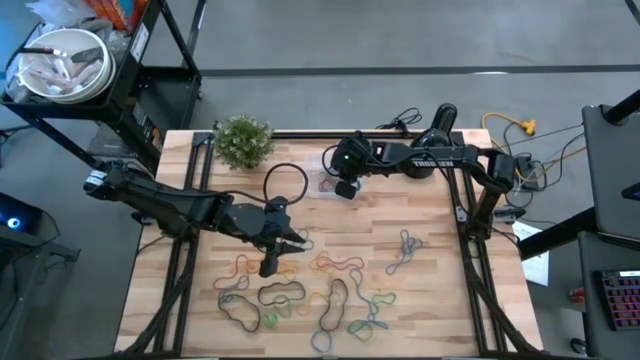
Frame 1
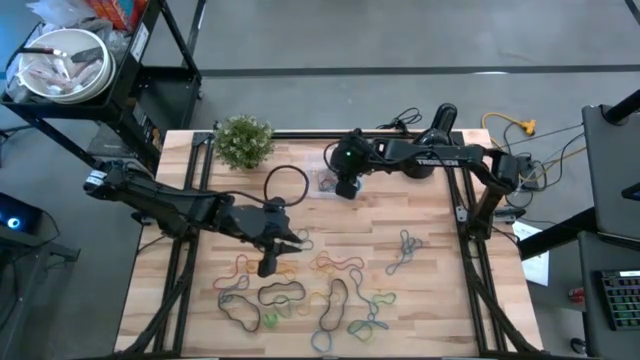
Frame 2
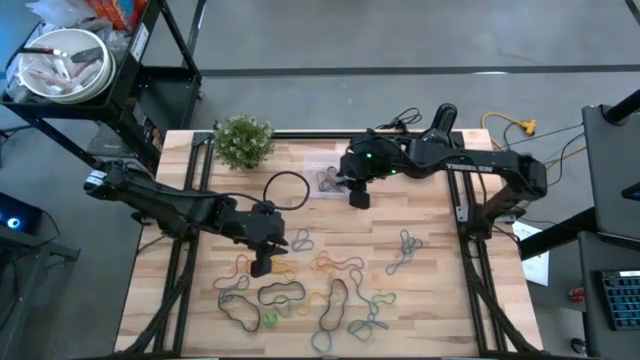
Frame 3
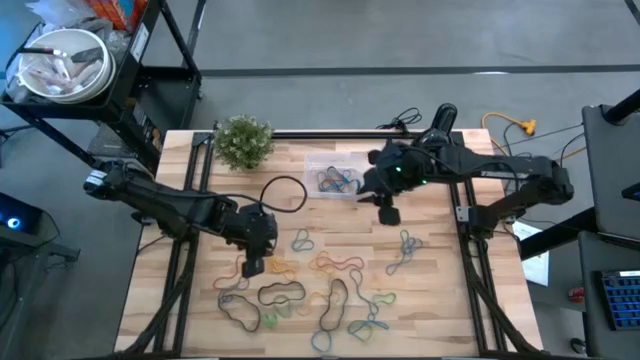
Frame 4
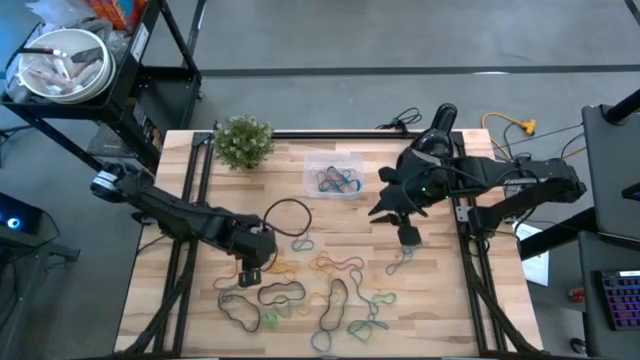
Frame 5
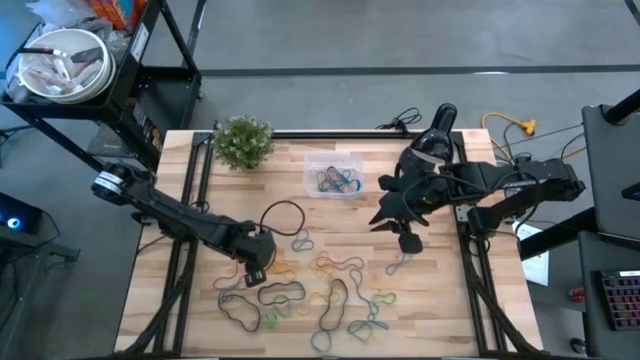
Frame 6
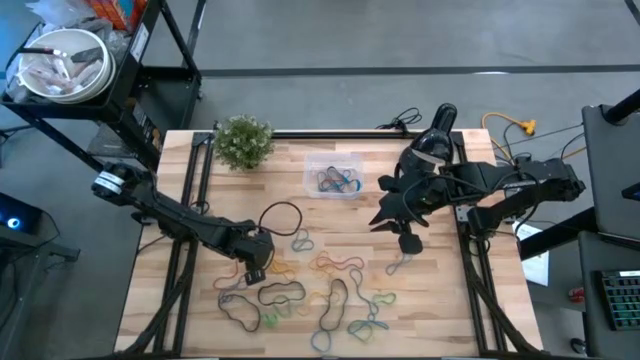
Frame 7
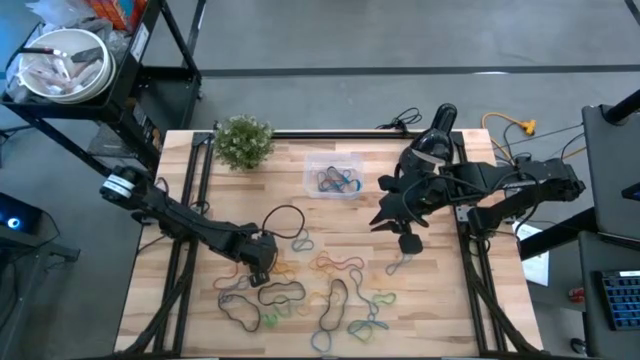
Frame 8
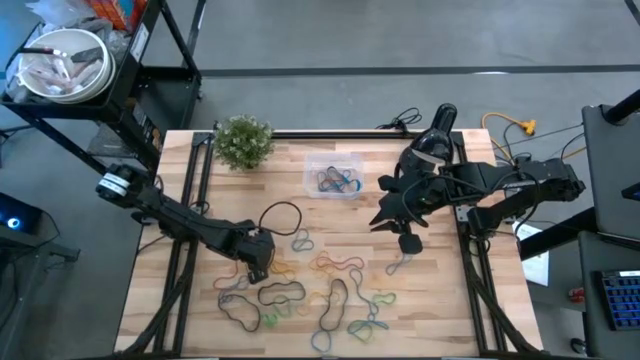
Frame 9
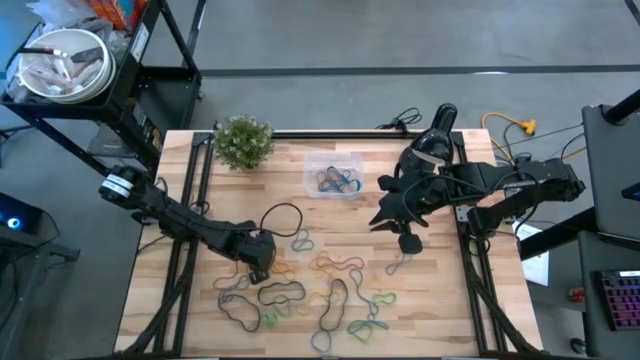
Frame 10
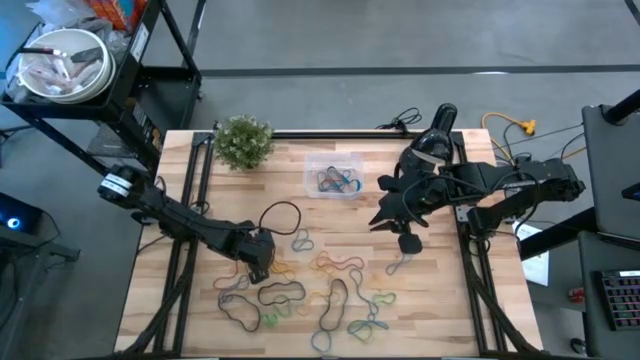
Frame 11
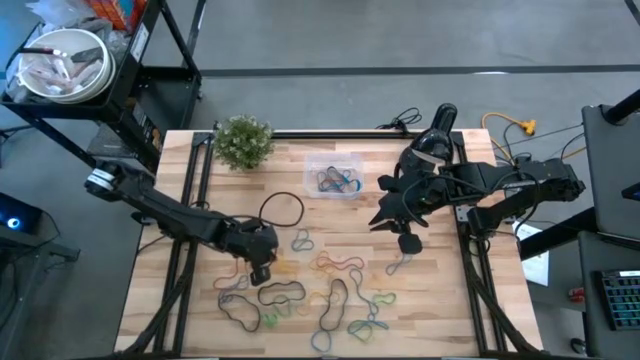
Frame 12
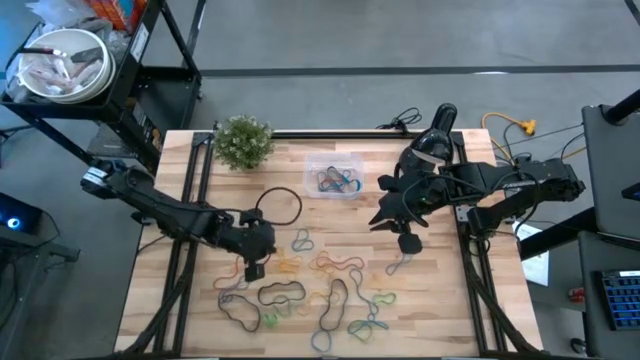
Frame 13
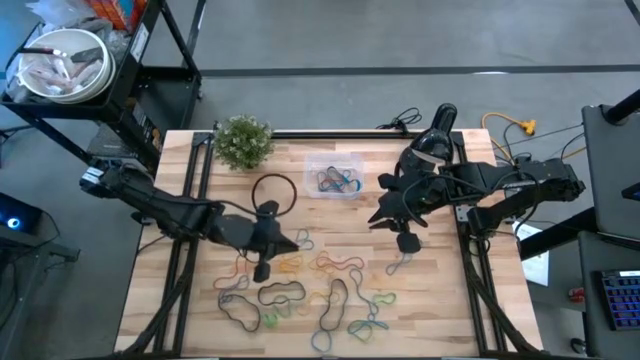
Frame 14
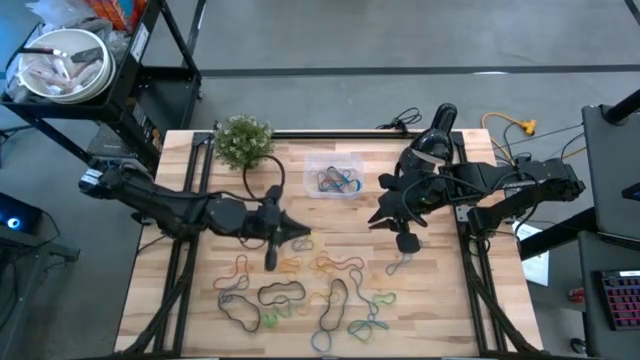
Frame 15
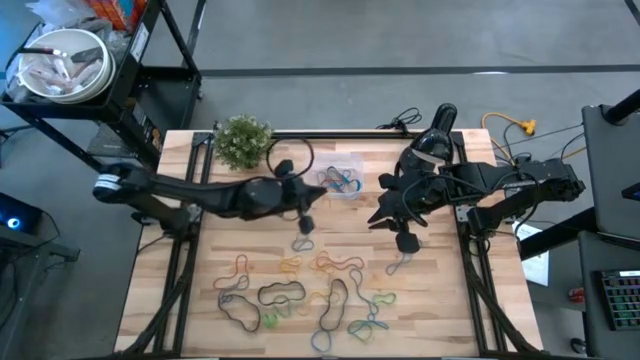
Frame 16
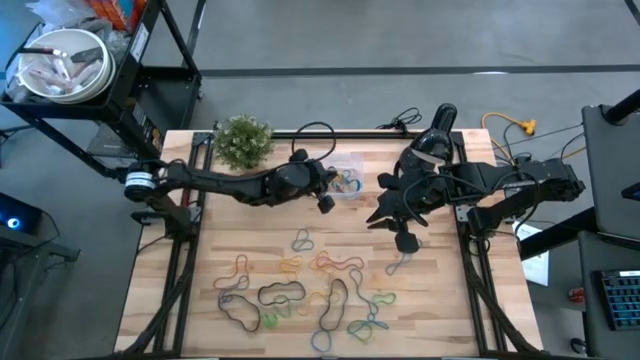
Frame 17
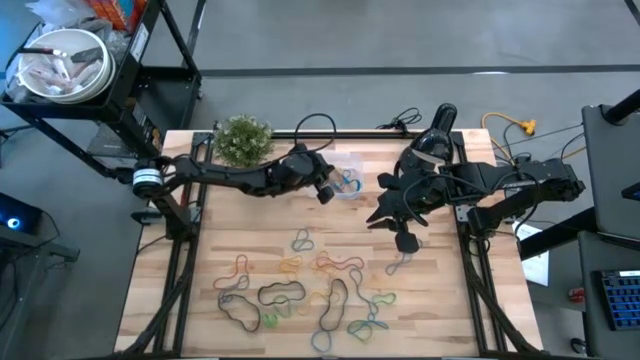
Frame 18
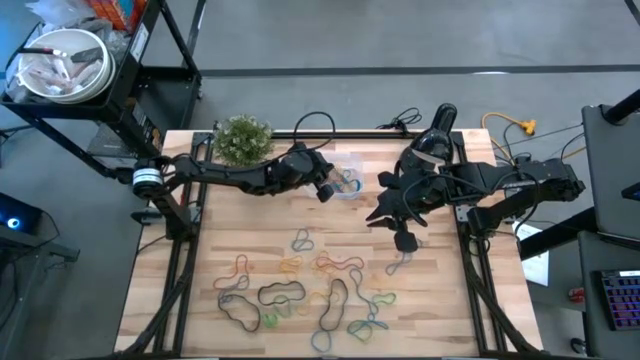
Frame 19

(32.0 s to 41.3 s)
Task: Pick and place rubber bands into bin
Put the yellow rubberband into the transparent bin

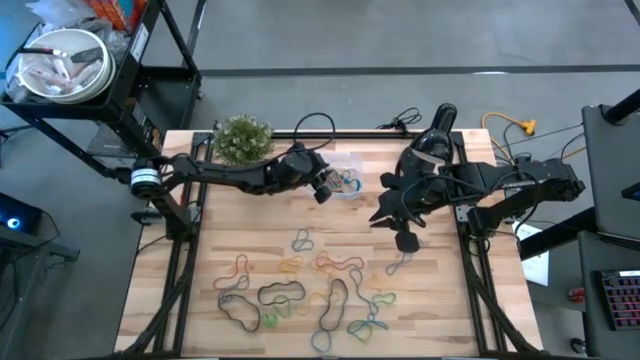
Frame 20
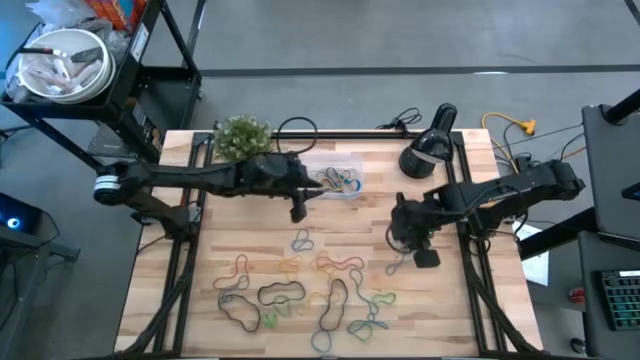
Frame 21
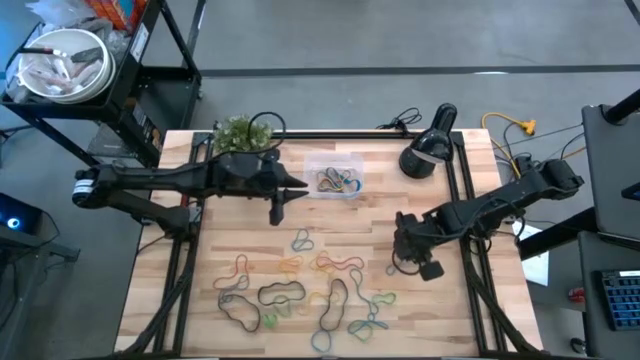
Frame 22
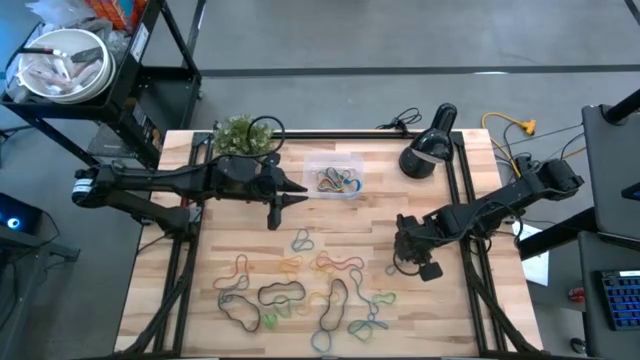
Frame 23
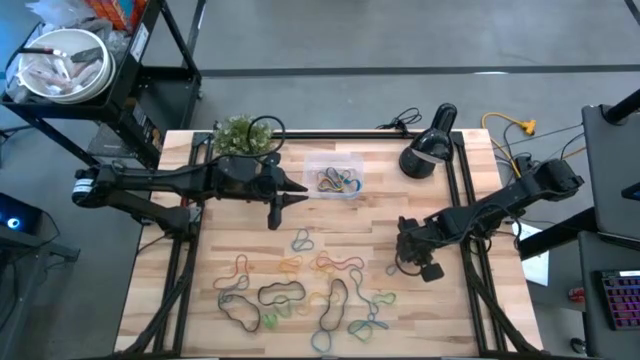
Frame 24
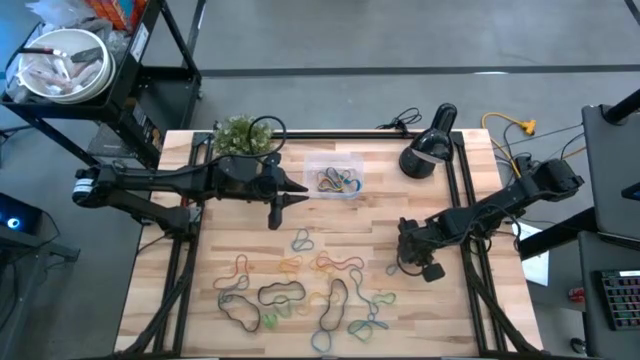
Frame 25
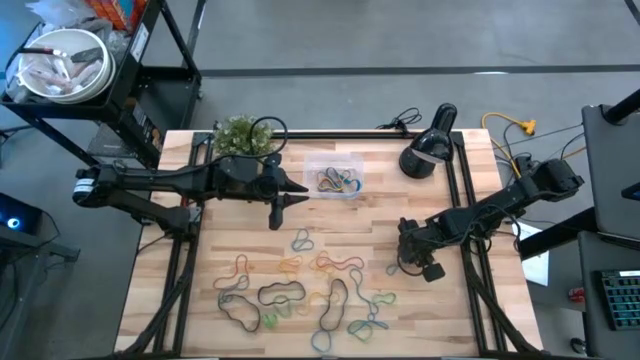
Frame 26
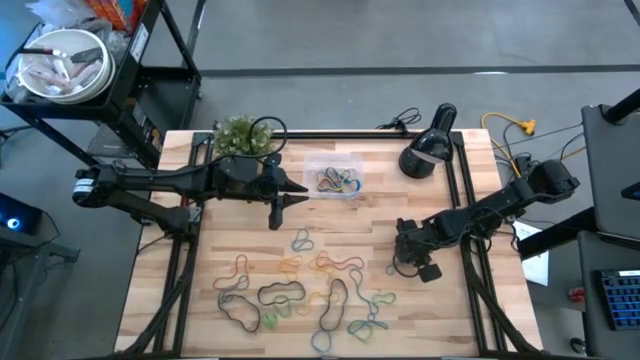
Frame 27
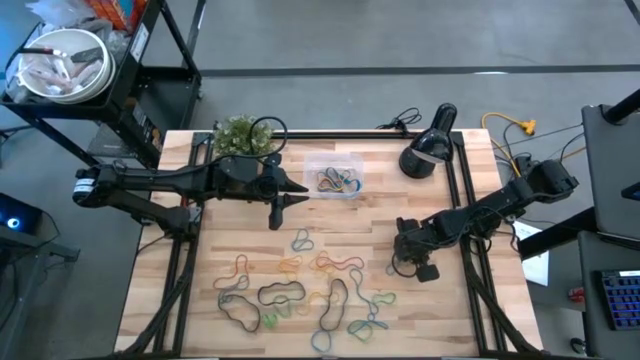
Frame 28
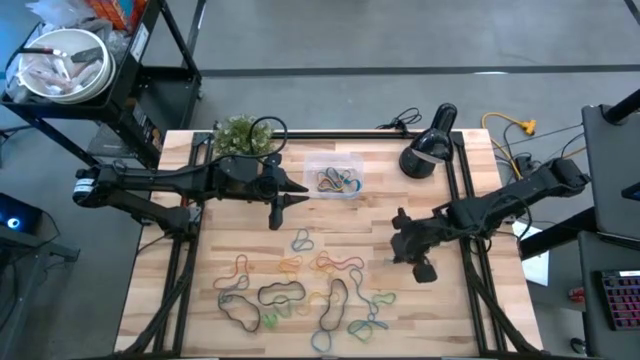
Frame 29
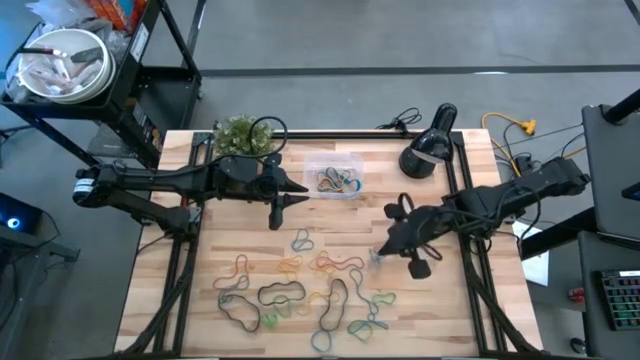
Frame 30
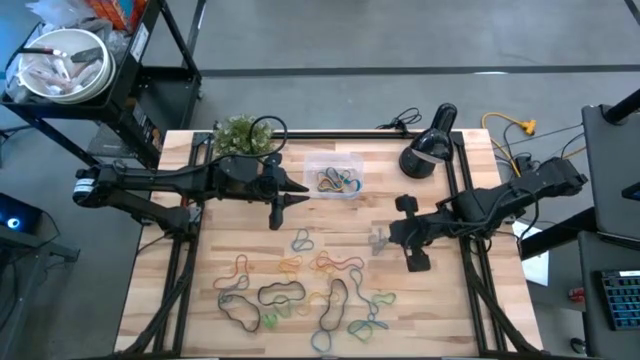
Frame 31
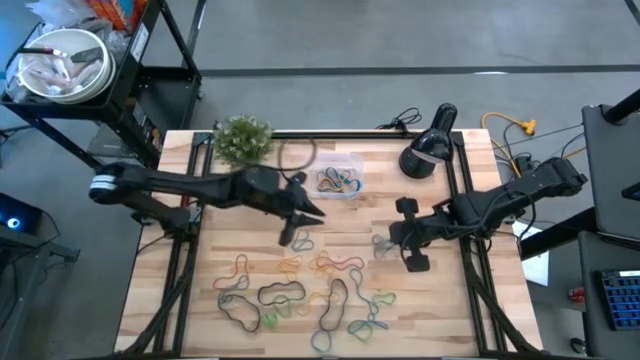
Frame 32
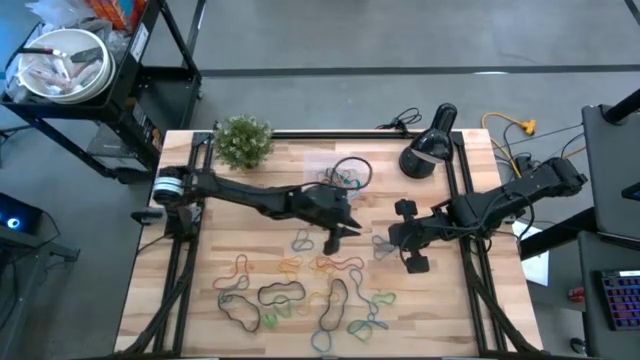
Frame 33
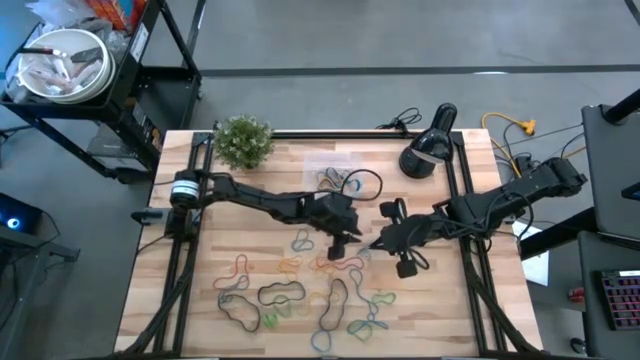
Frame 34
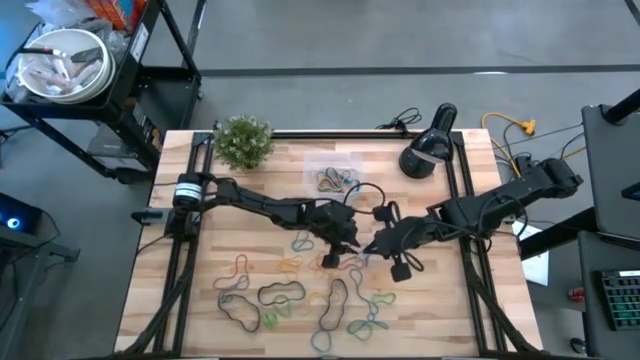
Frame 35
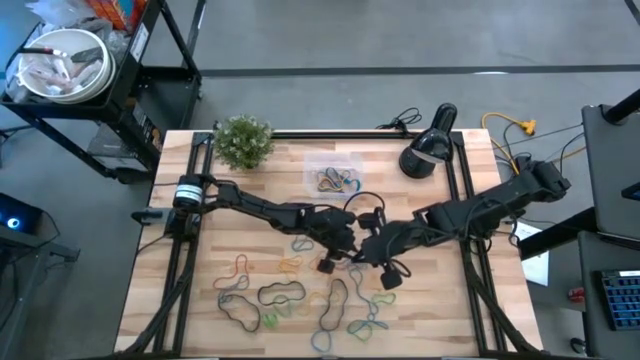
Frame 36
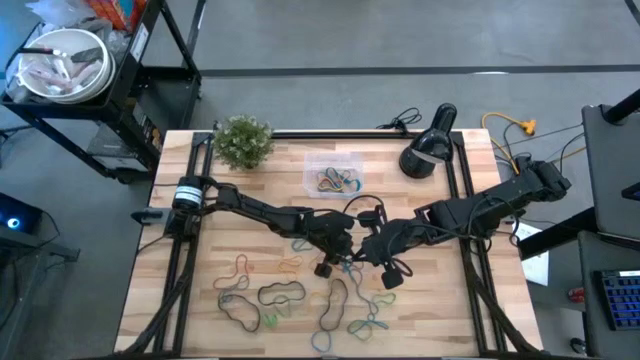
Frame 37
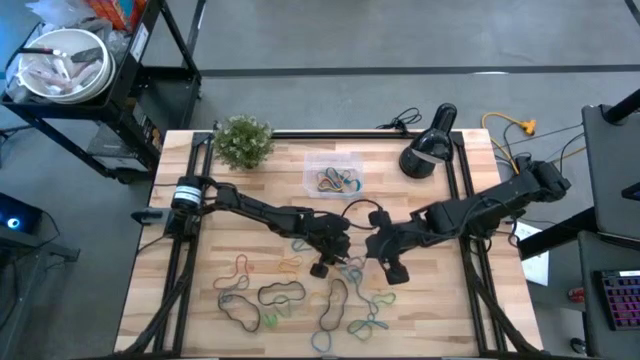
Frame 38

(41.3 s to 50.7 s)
Put the blue rubberband into the transparent bin

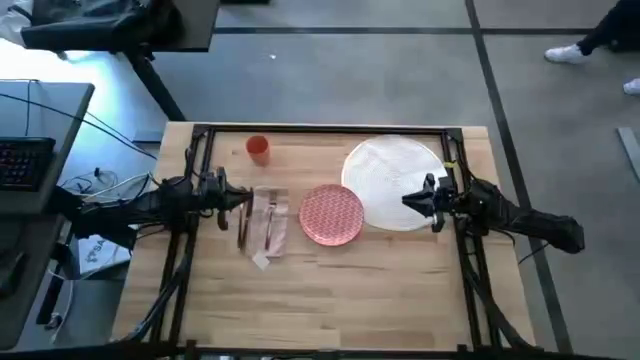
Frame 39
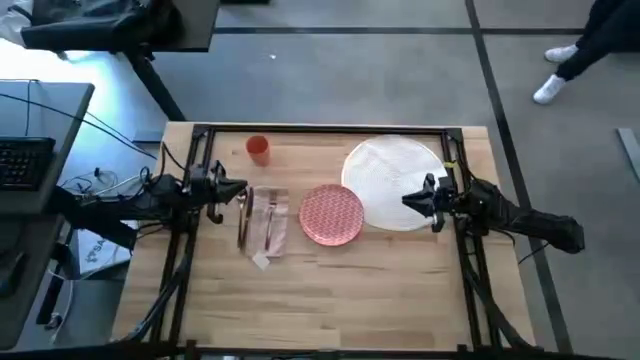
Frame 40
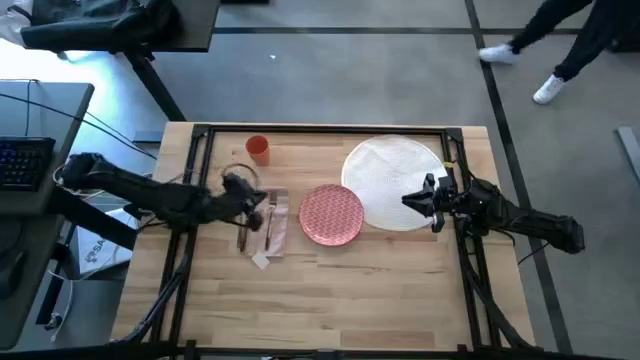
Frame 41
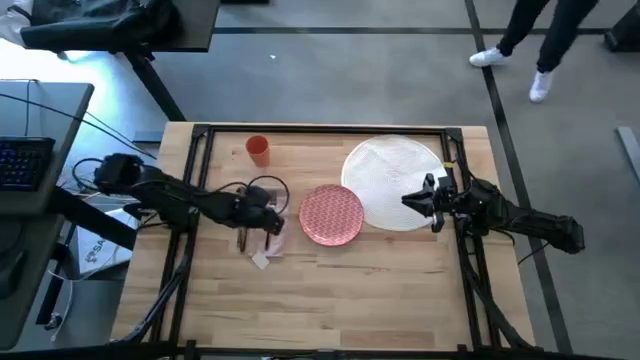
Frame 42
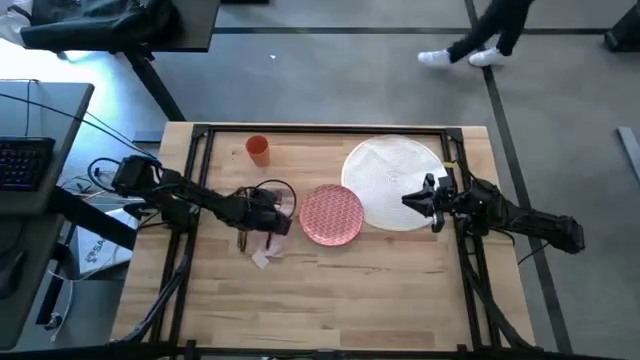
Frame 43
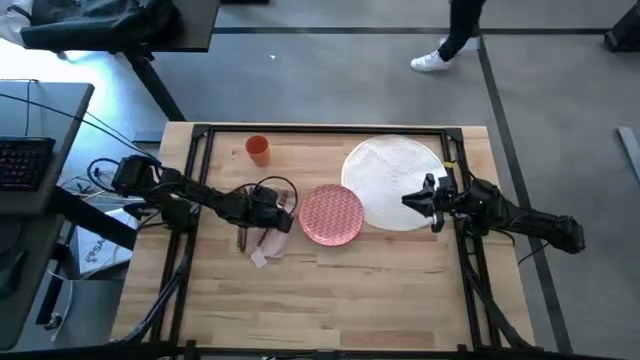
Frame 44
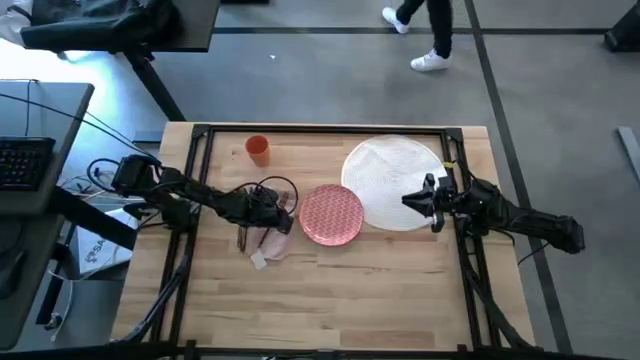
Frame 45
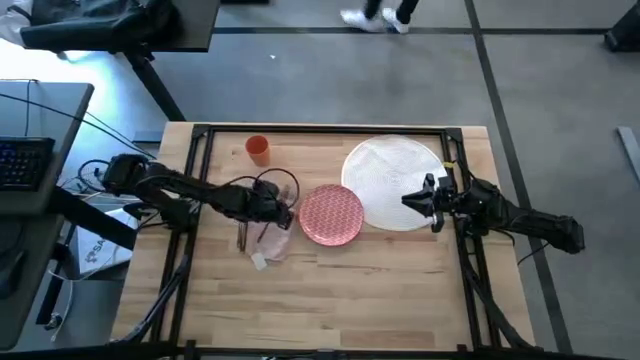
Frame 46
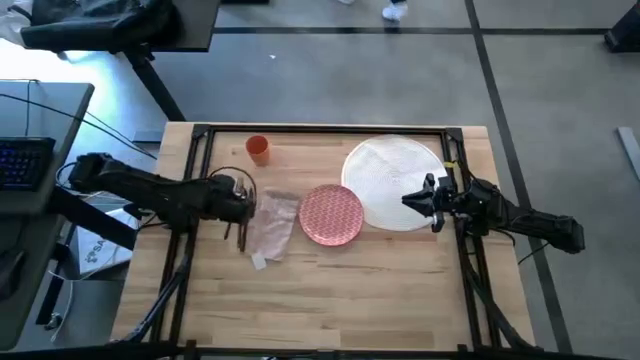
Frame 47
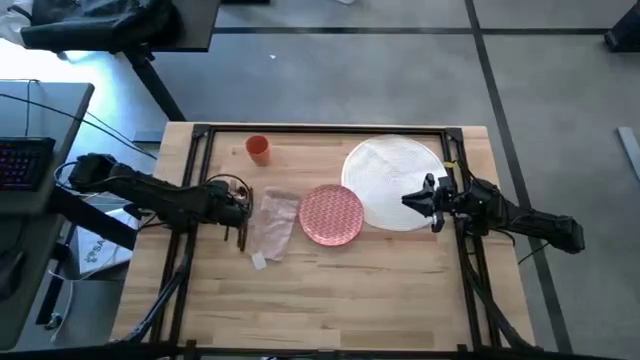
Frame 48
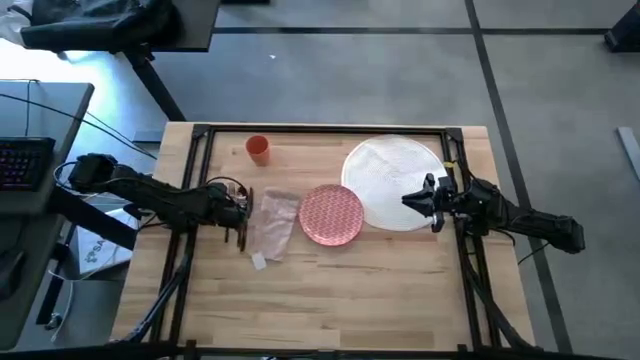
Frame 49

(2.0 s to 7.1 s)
Task: Set table place
Move the fork beside the spoon
